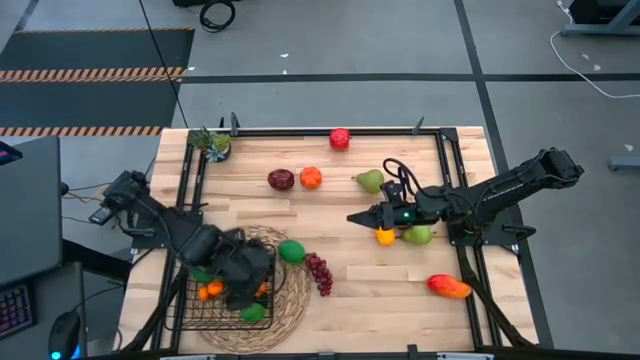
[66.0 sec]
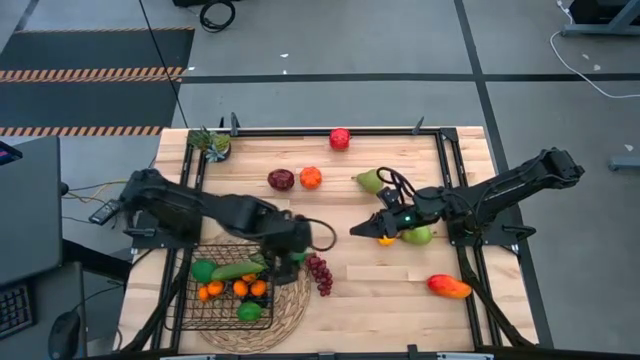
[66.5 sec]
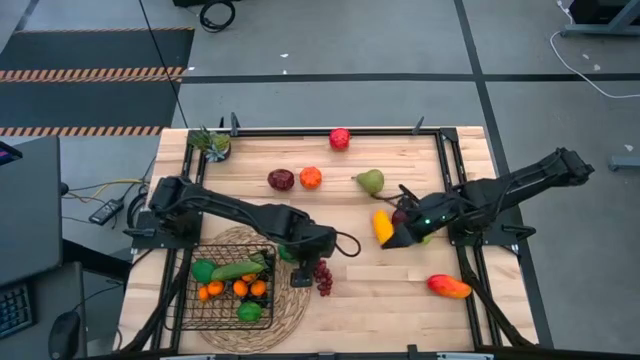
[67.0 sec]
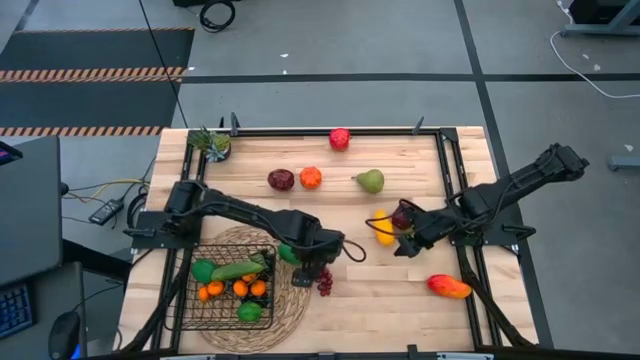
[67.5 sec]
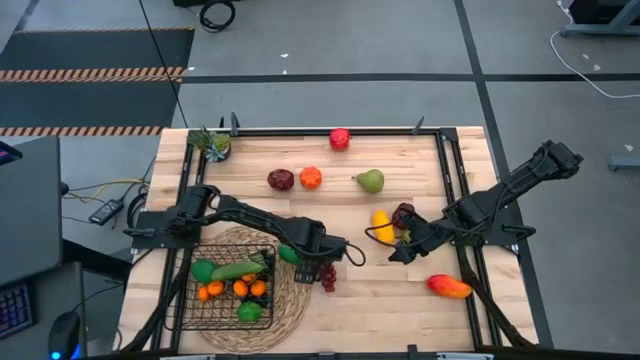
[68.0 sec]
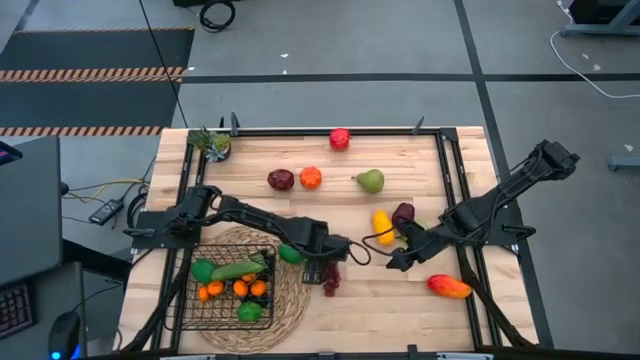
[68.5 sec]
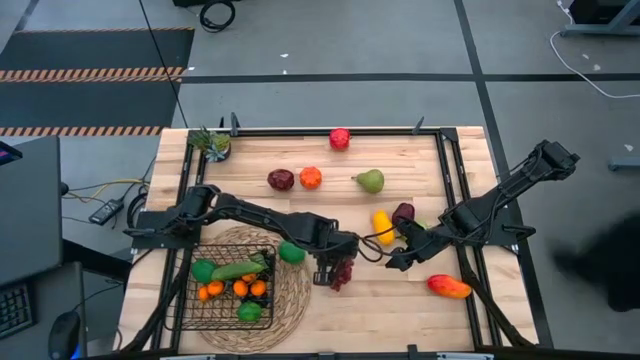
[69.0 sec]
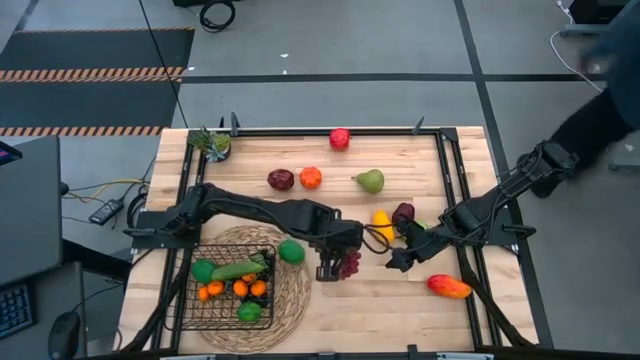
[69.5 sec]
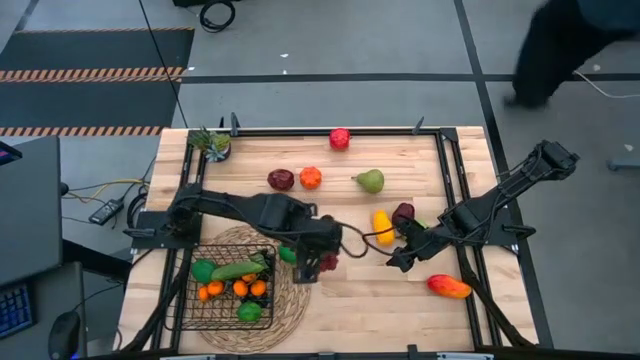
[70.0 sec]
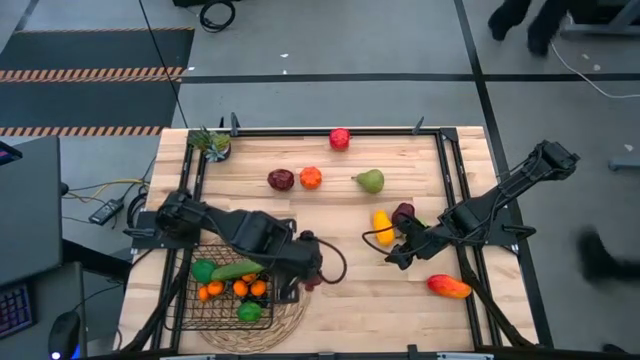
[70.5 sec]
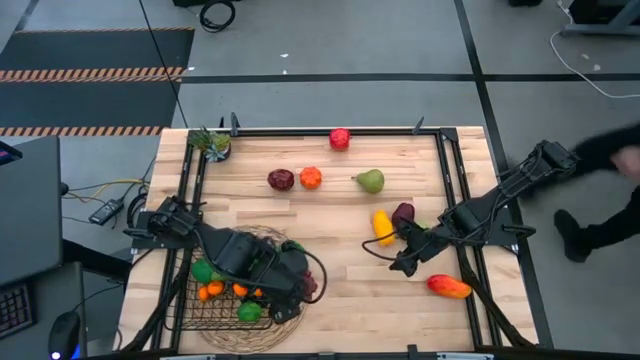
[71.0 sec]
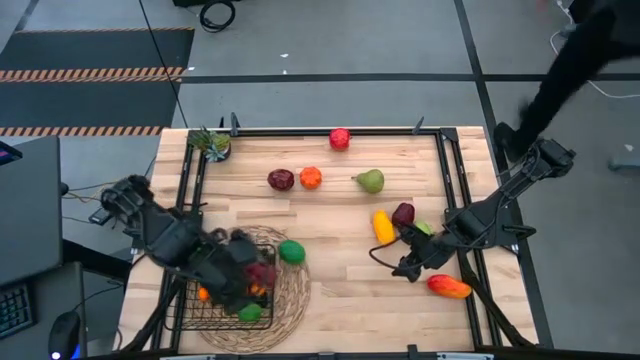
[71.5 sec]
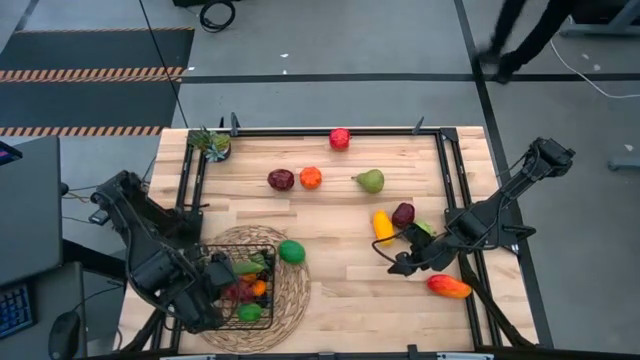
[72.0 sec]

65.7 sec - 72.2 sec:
Task: Build produce basket
Put the red grapes into the black wire basket

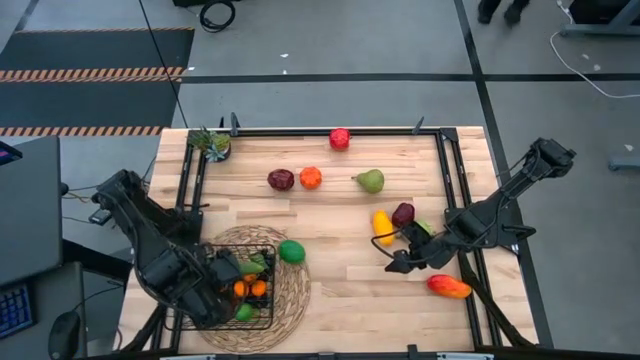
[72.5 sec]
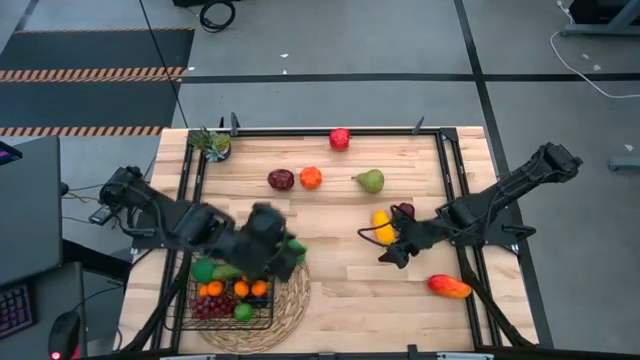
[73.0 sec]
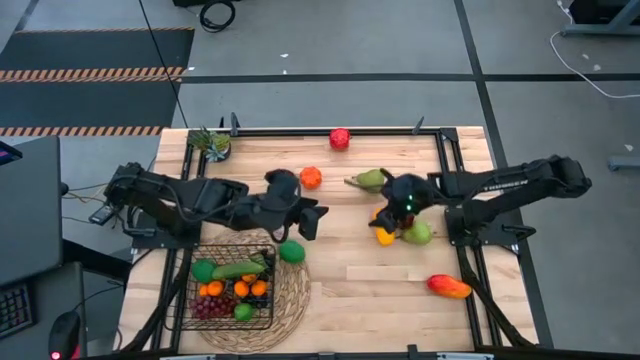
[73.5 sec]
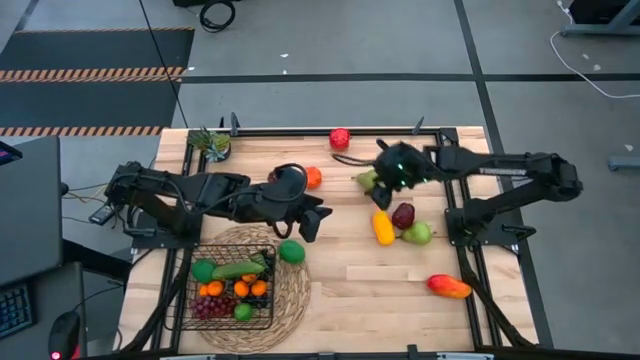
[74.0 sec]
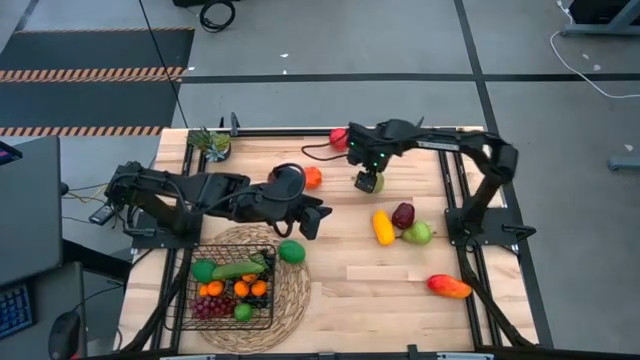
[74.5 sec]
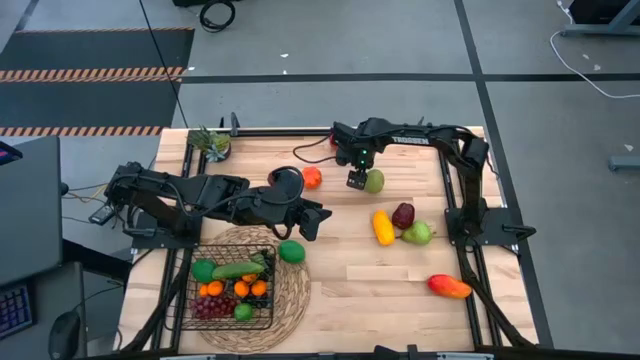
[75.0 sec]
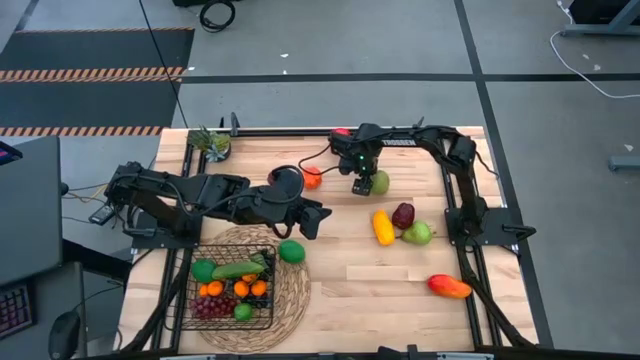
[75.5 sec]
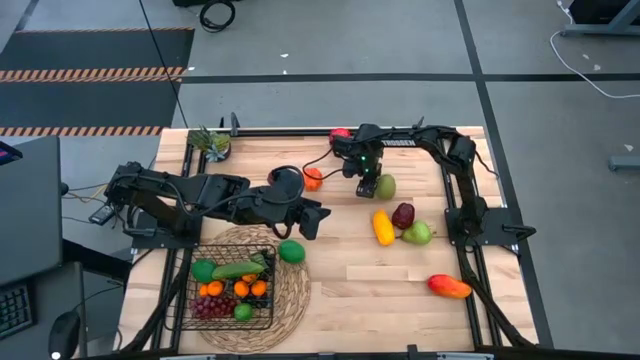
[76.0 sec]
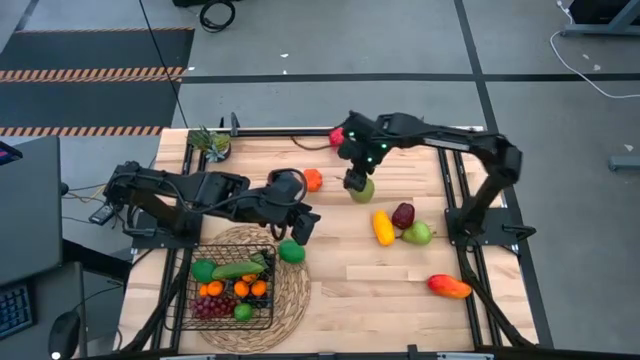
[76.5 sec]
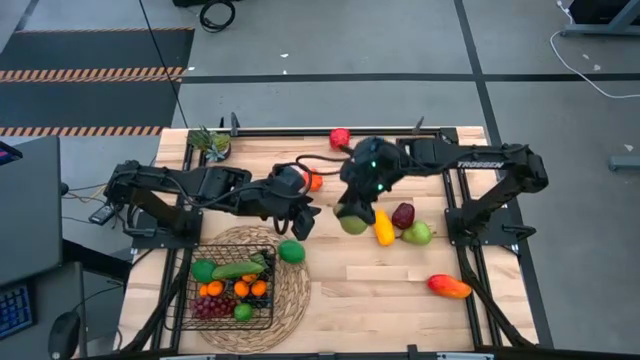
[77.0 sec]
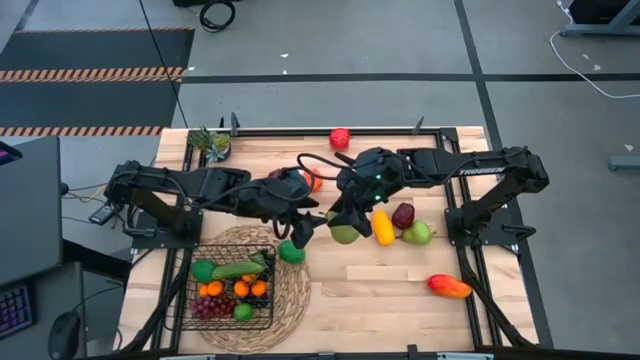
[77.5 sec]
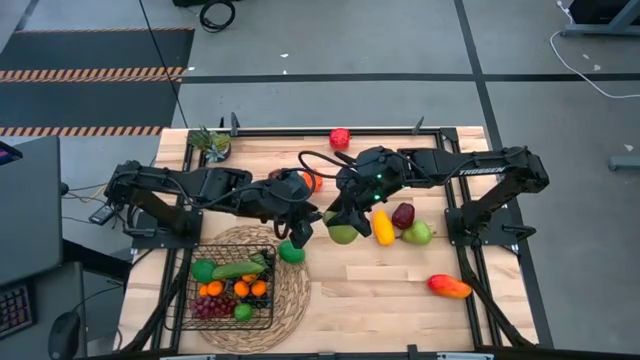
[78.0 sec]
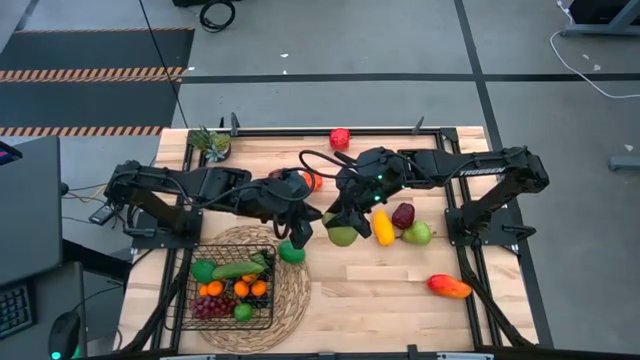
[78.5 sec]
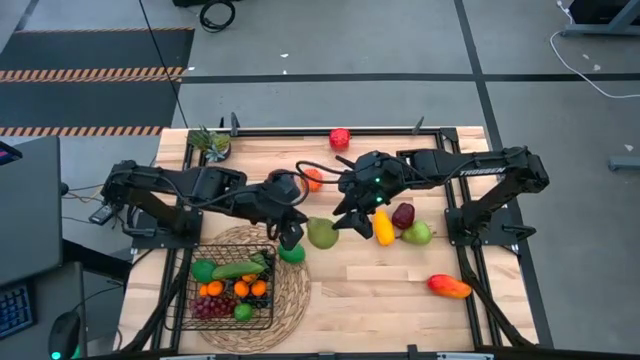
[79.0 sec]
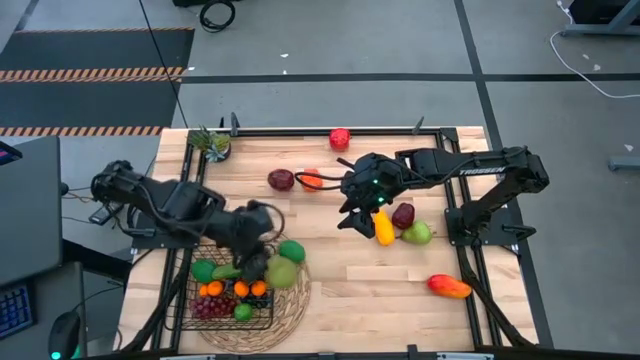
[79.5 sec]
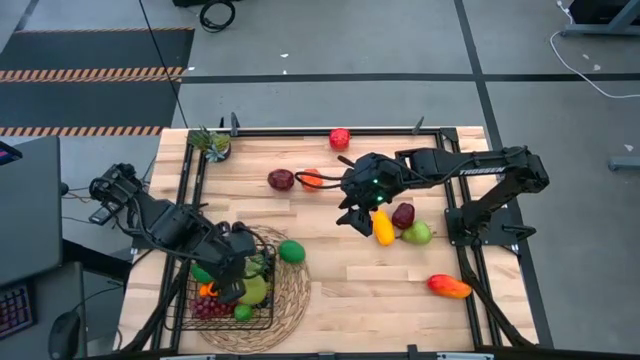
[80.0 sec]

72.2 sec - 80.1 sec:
Put the top pear into the black wire basket

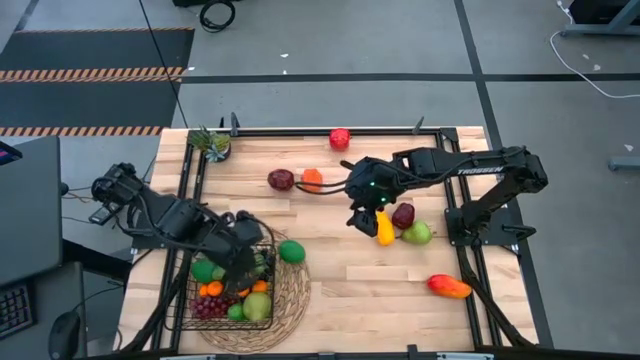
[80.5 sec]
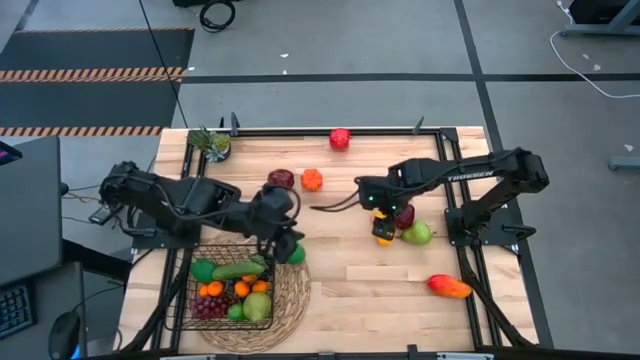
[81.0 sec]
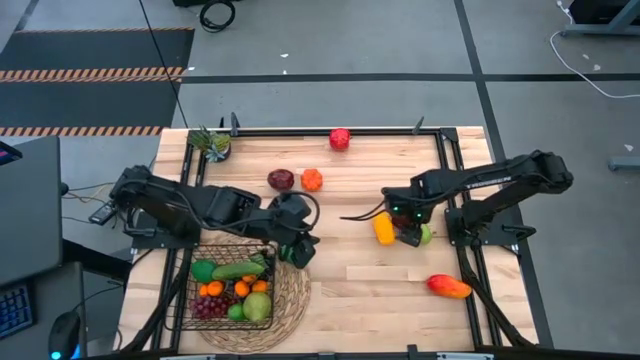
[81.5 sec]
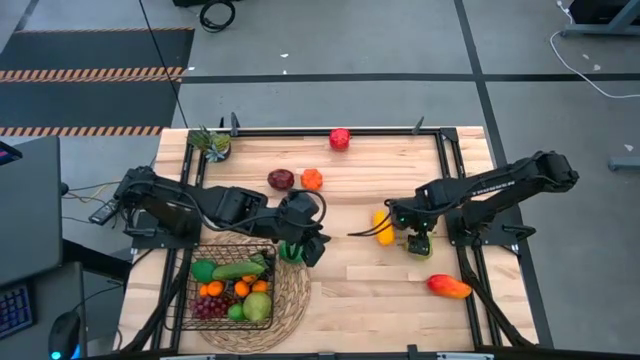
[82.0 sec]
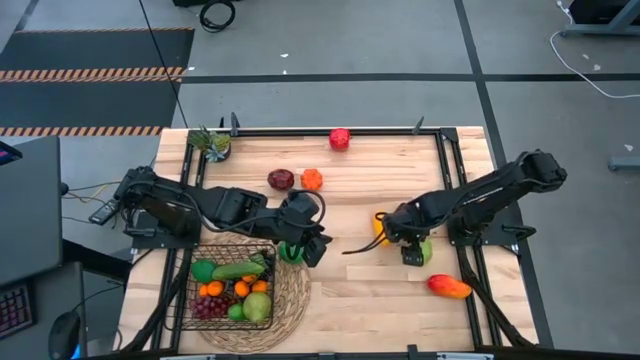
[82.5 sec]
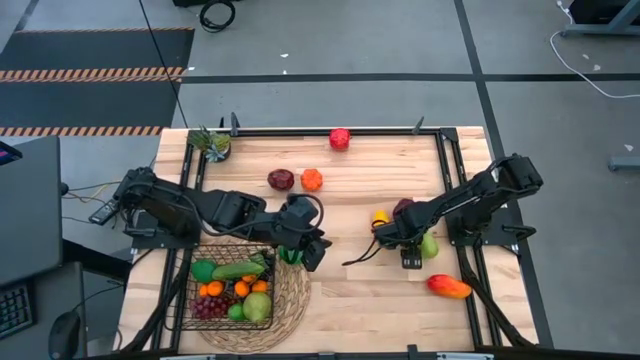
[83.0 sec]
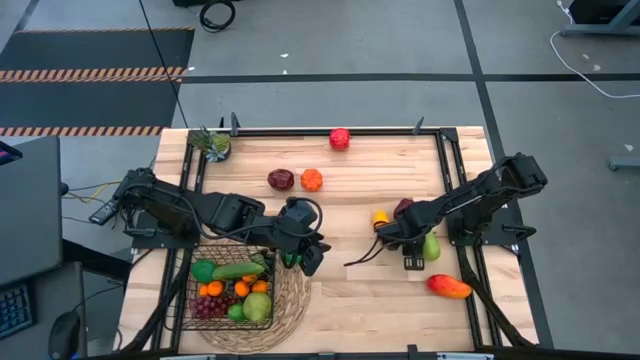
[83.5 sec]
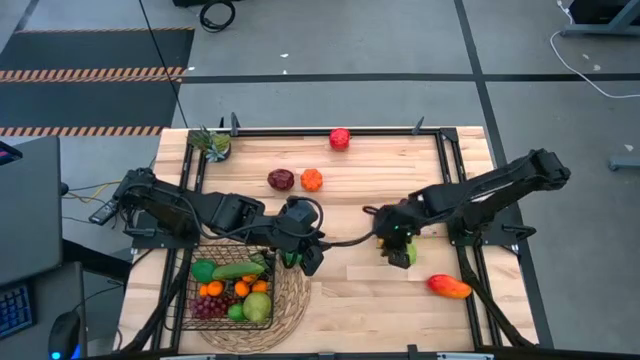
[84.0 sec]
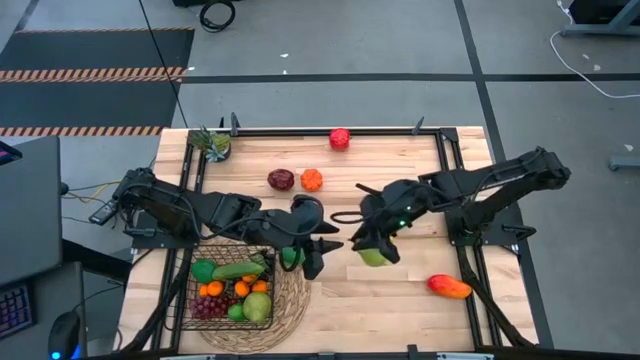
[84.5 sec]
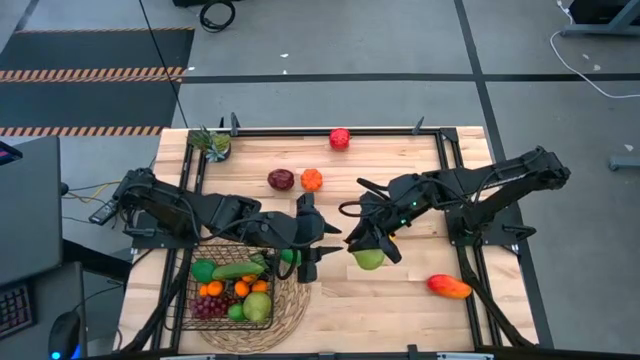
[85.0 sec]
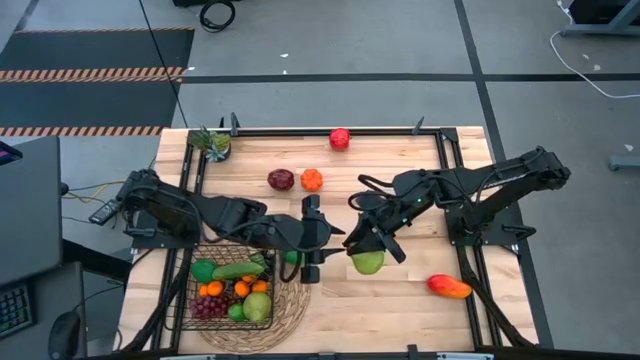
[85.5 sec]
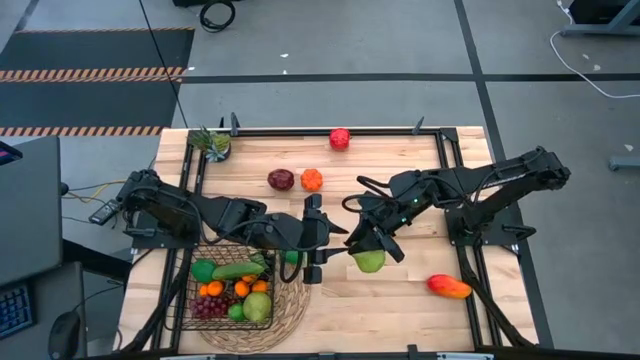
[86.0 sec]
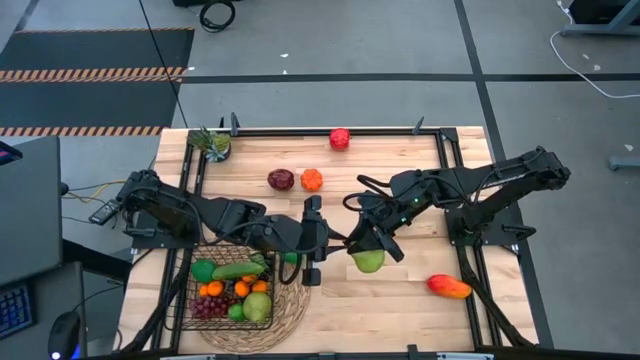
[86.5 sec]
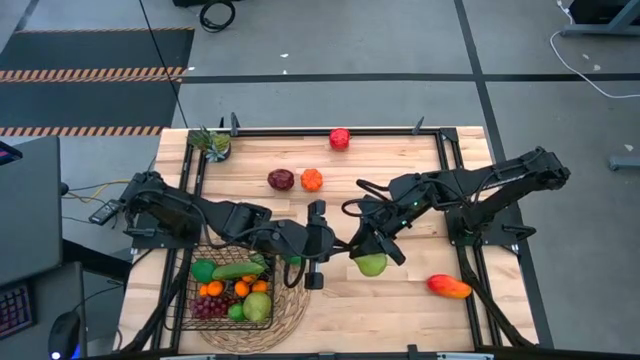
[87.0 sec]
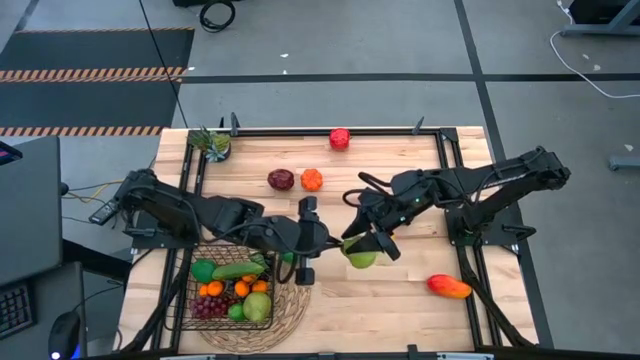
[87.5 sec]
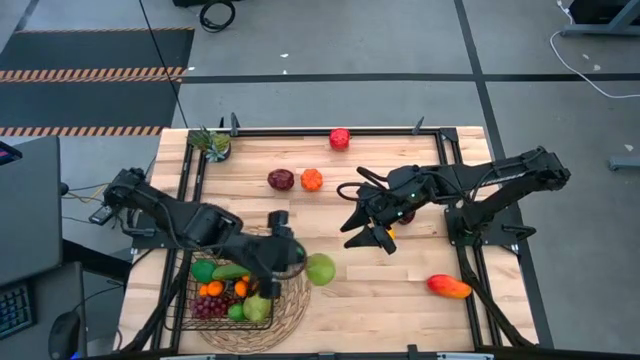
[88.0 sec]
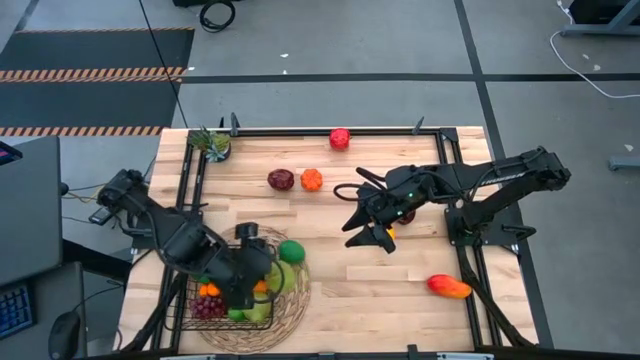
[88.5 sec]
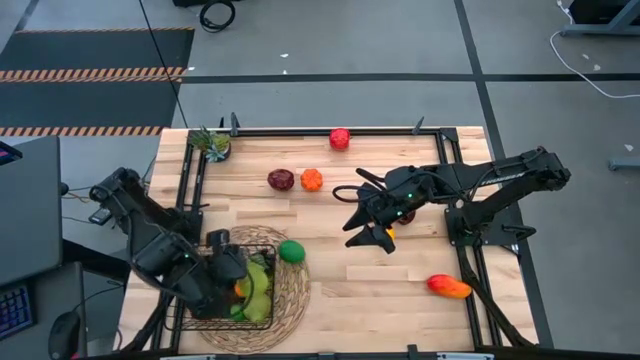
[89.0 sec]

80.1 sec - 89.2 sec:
Put the pear into the black wire basket
